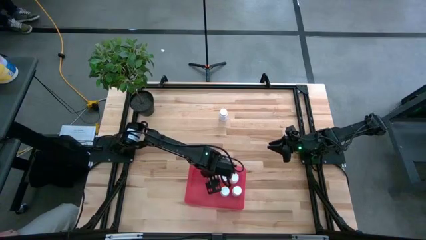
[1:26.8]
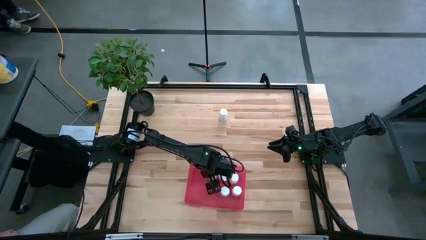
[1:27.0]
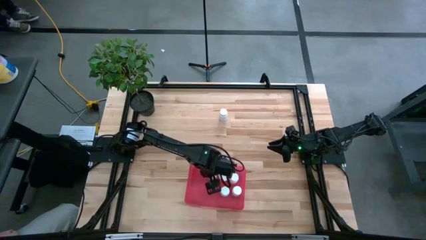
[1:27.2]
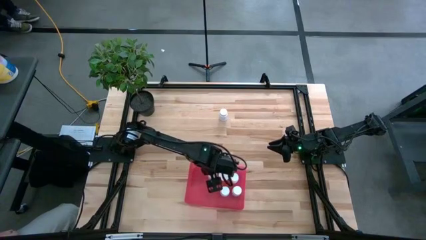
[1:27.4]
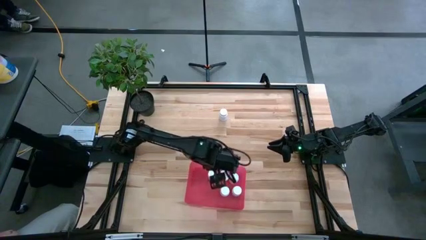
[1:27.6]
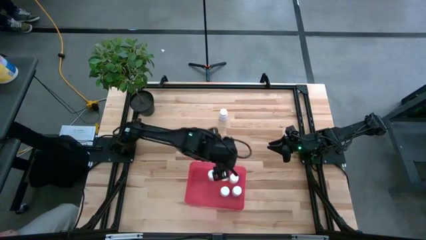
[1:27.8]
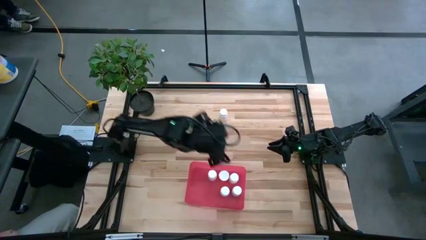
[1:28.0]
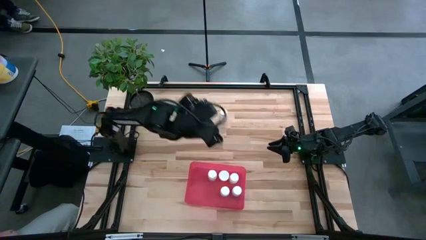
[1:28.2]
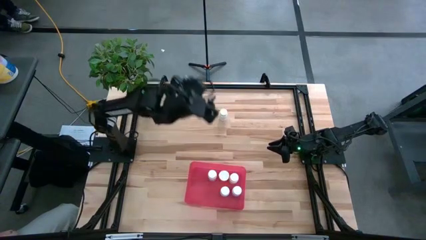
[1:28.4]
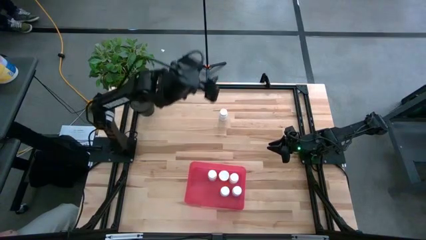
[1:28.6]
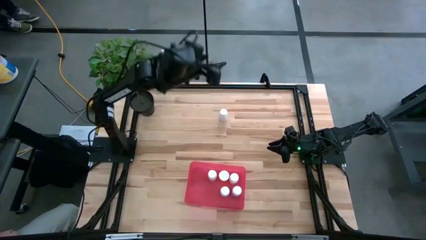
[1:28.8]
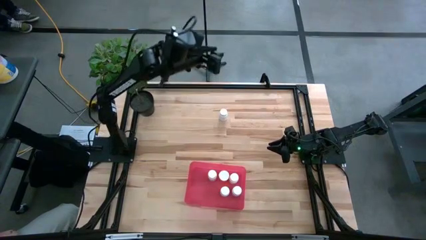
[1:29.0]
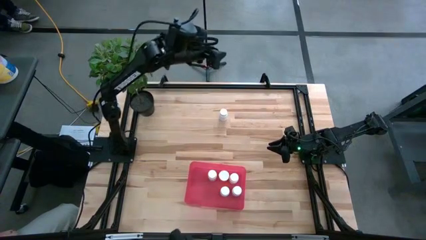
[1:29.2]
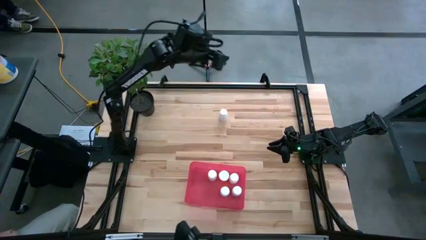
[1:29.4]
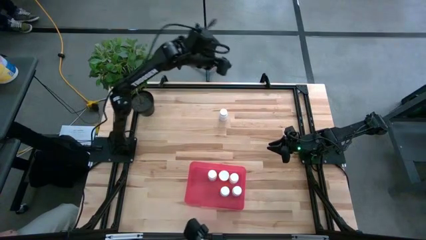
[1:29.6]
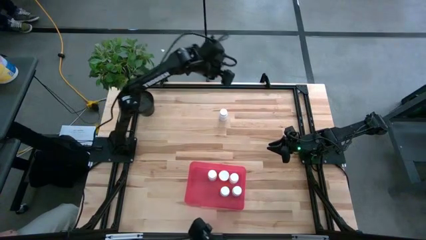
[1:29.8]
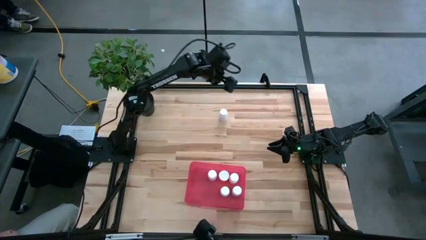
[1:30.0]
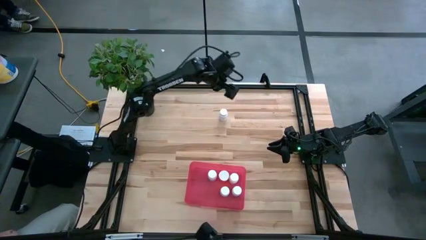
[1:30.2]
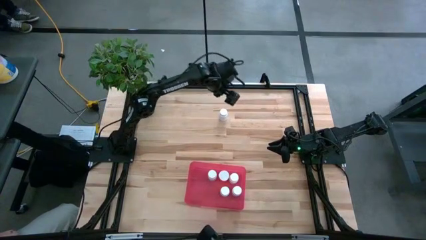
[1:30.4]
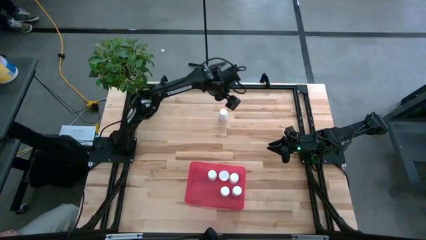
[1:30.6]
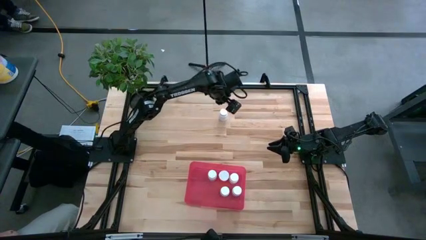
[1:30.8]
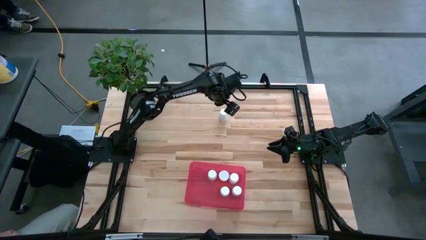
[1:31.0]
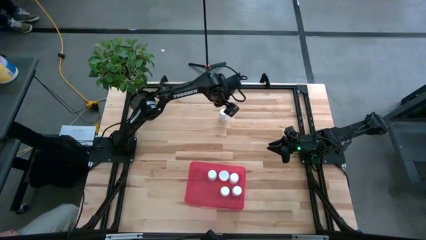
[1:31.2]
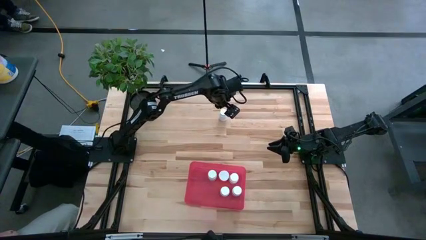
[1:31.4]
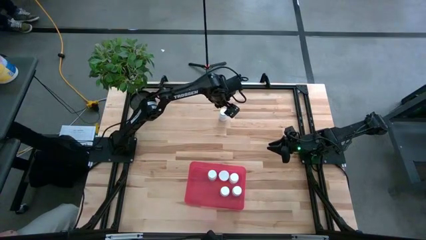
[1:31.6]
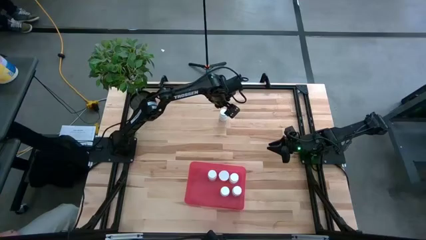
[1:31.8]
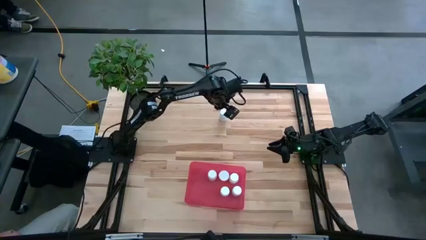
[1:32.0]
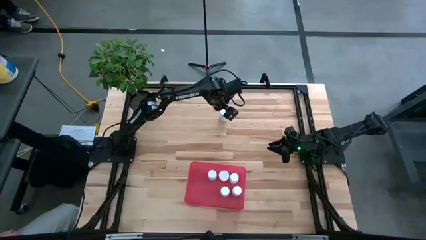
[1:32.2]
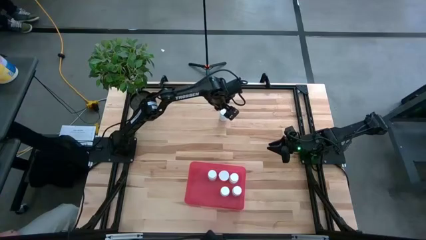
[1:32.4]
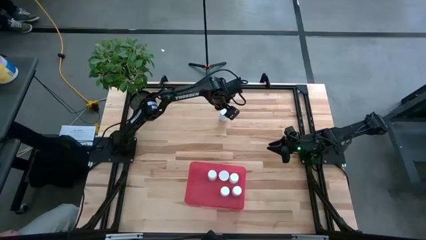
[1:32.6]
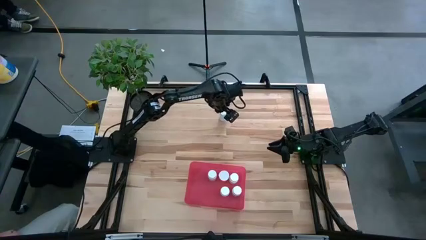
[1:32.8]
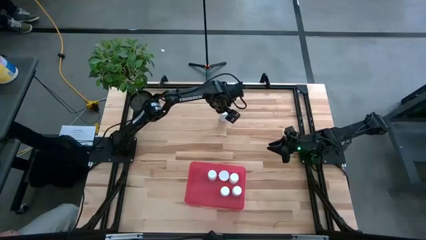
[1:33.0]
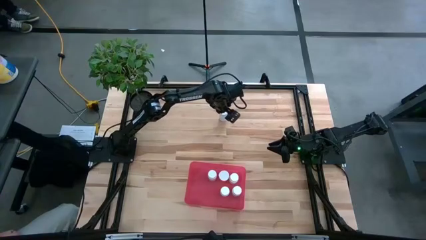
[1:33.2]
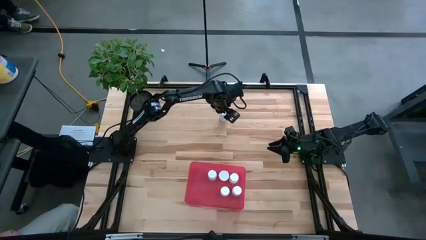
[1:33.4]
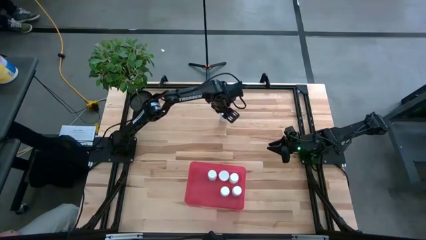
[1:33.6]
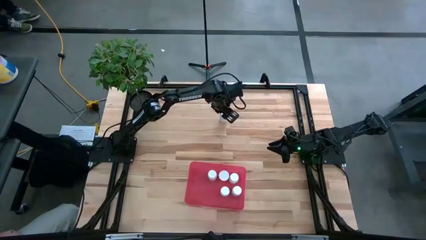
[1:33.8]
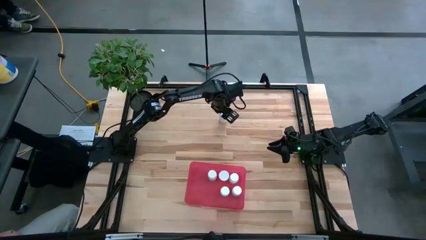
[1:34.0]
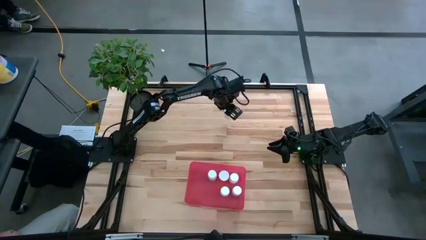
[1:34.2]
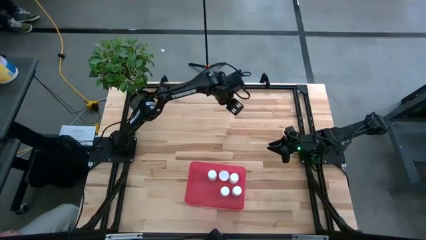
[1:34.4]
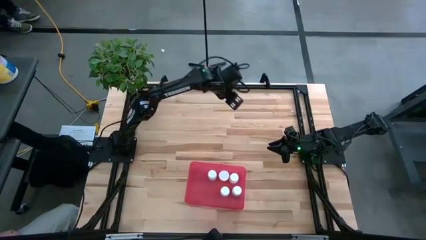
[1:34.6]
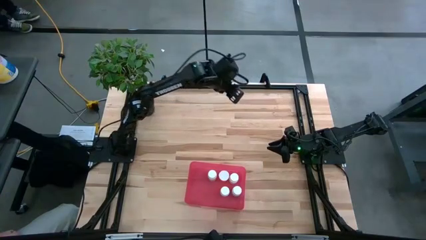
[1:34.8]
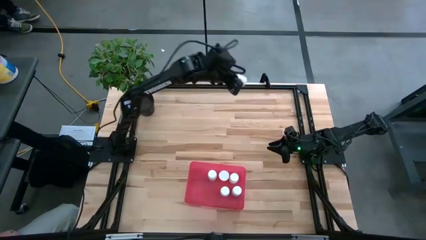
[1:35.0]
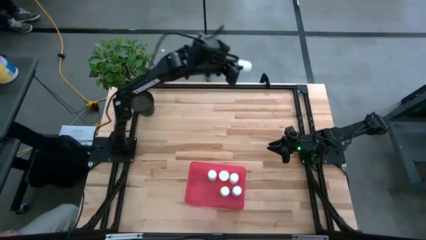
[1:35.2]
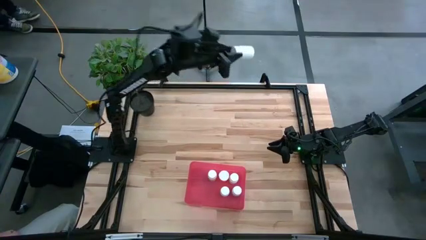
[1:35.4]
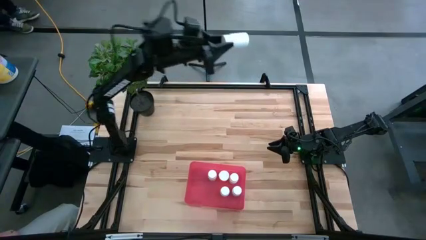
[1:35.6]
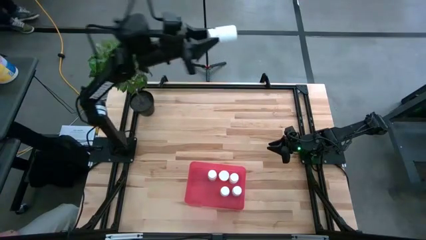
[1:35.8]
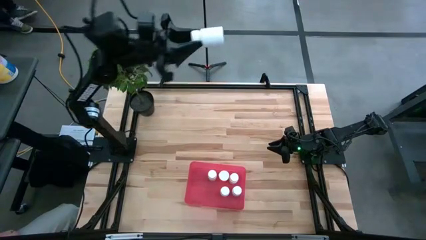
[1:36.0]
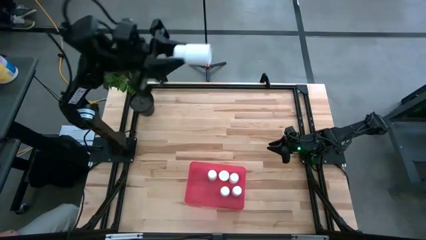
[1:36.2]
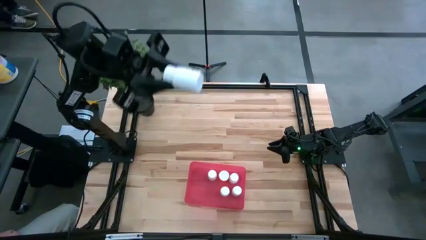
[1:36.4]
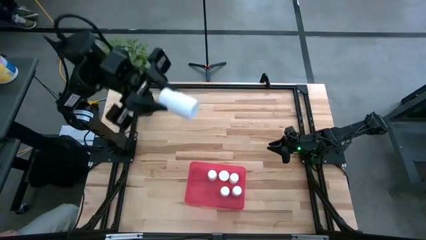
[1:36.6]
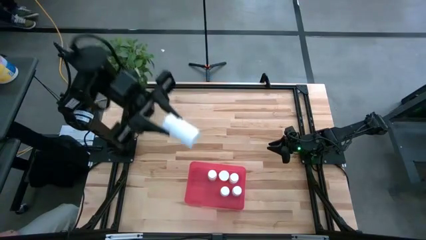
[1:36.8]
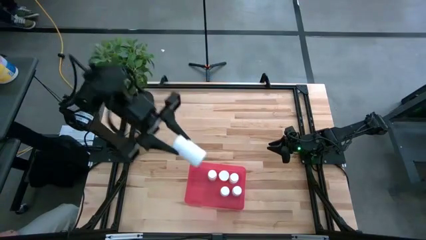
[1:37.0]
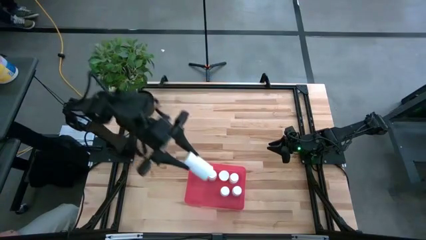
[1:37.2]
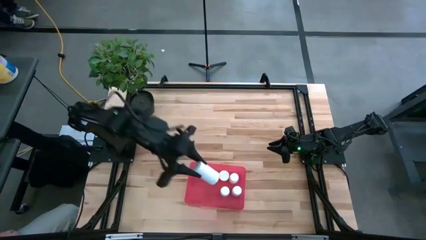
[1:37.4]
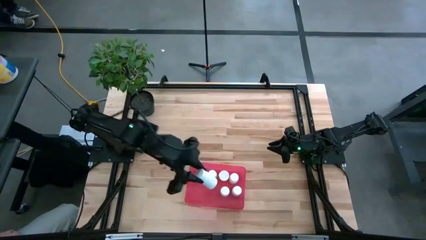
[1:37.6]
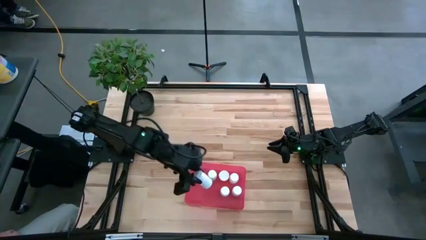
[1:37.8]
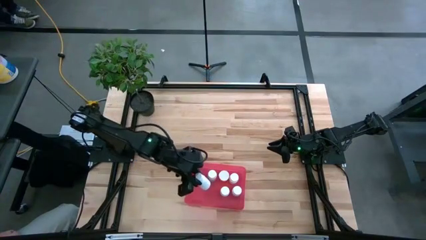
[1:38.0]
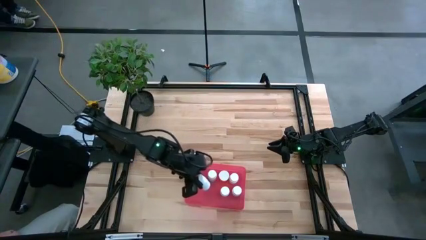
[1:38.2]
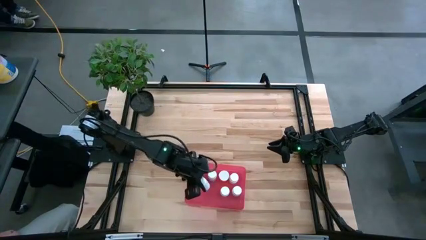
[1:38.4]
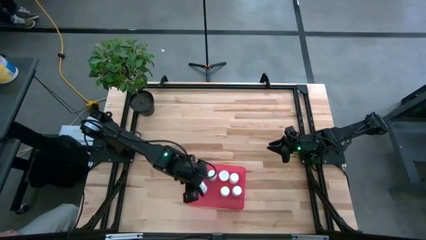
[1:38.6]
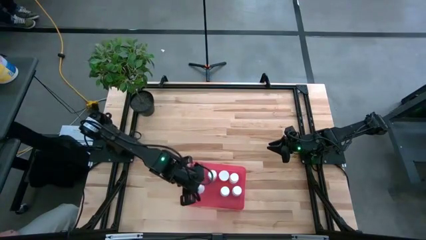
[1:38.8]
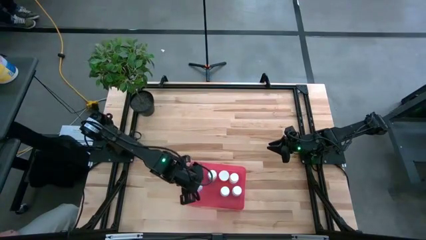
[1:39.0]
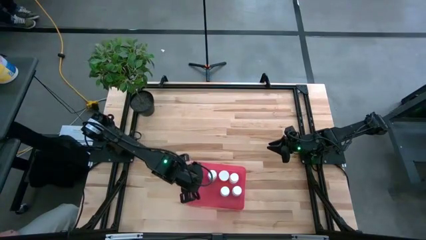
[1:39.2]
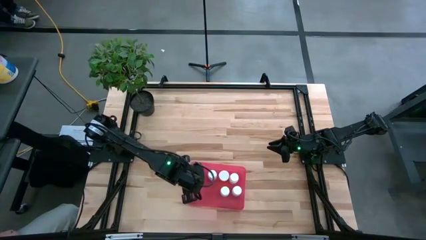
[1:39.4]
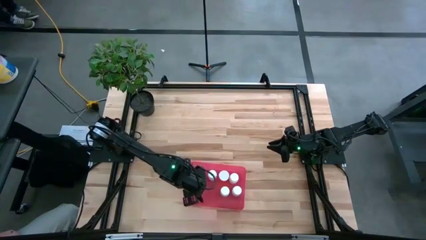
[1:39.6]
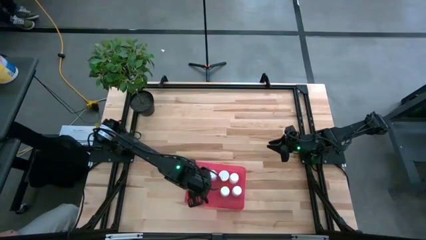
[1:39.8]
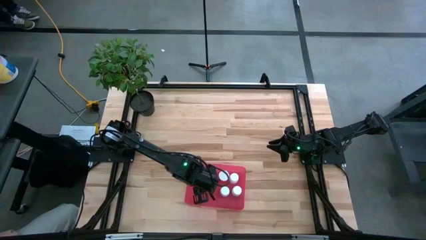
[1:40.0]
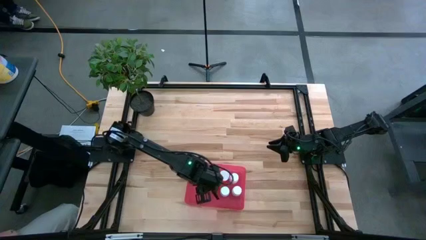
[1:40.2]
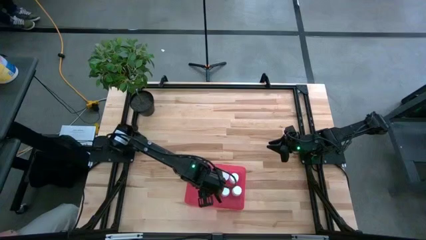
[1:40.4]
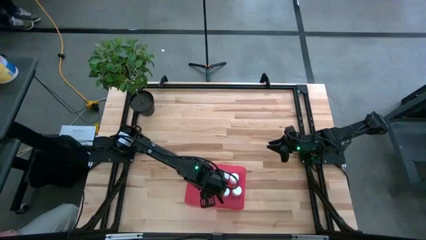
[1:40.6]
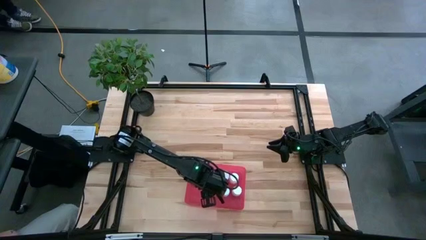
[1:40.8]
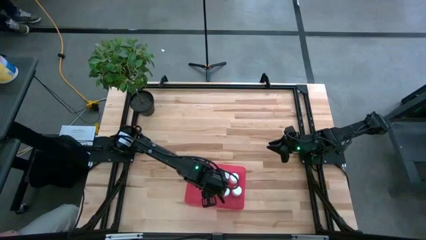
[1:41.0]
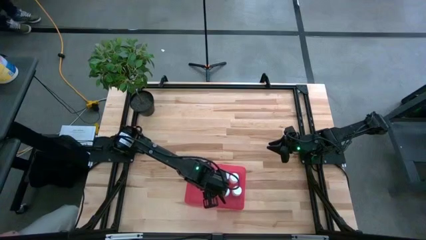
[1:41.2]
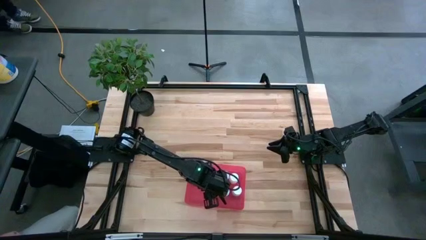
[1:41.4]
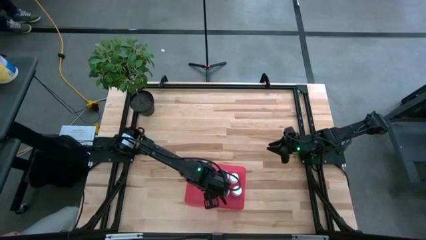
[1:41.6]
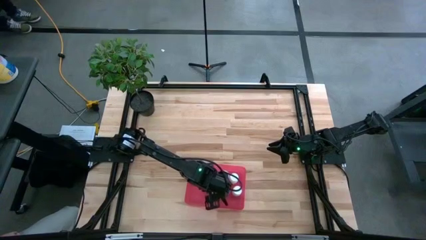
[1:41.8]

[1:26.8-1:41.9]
Task: Pick and place pill bottles into a basket
Put the white pill bottle into the red bin
